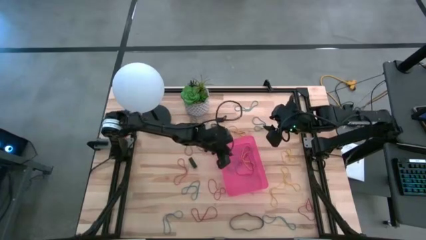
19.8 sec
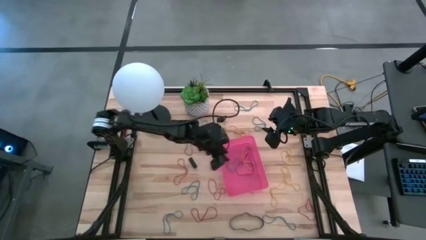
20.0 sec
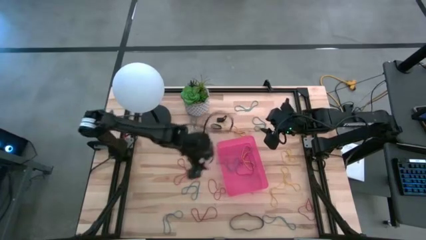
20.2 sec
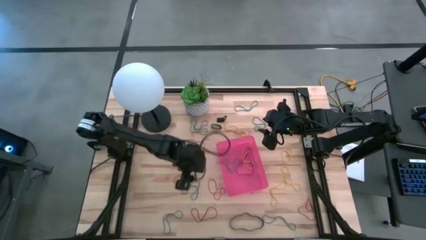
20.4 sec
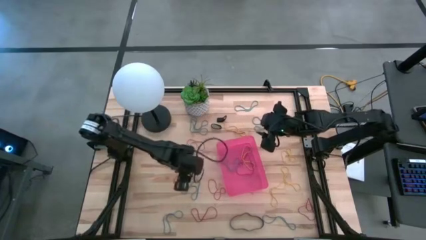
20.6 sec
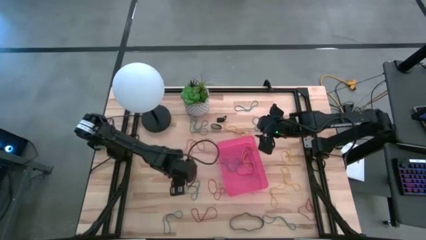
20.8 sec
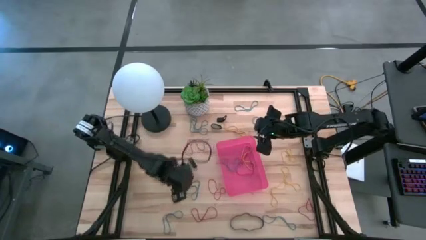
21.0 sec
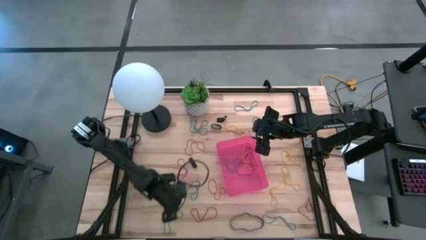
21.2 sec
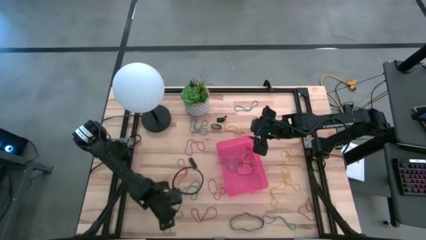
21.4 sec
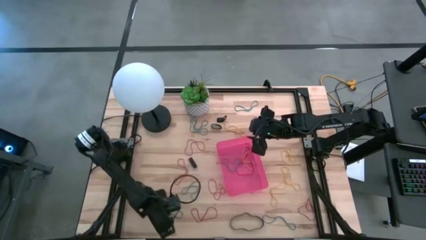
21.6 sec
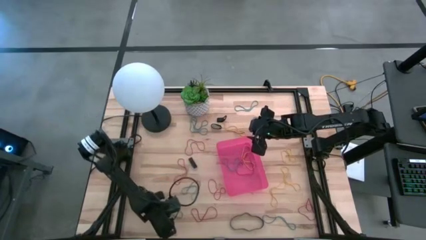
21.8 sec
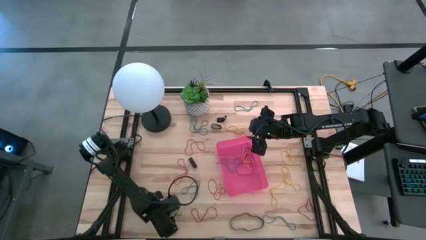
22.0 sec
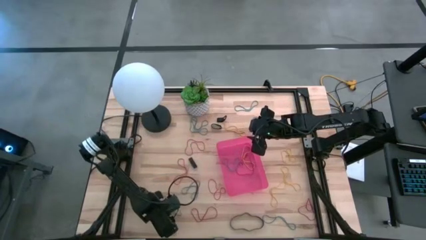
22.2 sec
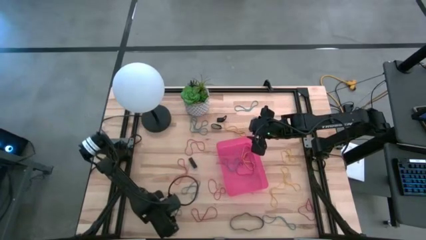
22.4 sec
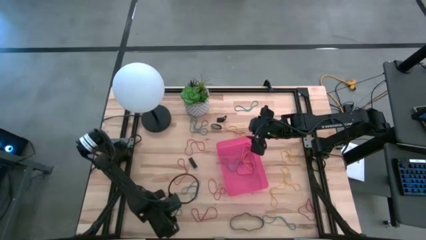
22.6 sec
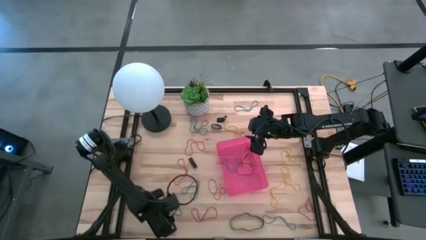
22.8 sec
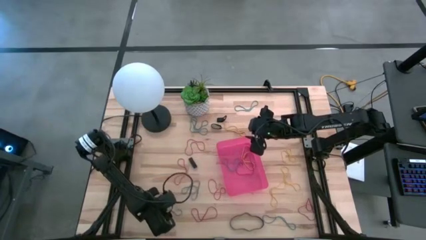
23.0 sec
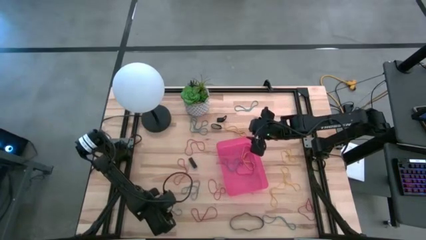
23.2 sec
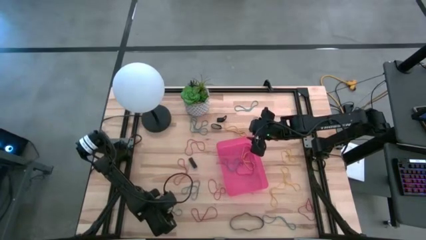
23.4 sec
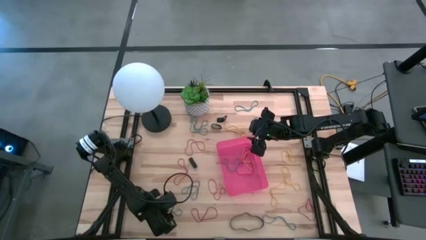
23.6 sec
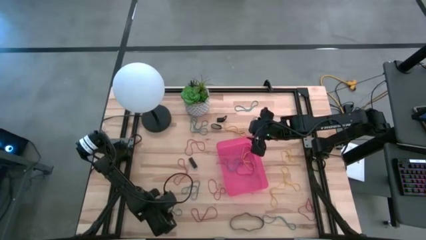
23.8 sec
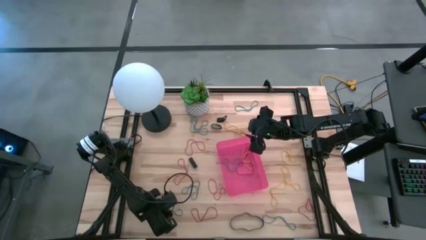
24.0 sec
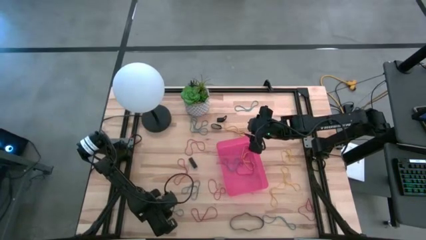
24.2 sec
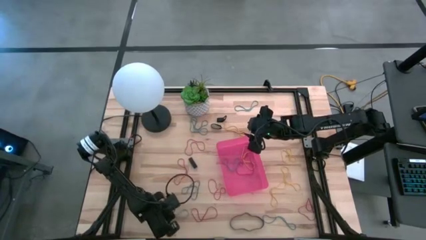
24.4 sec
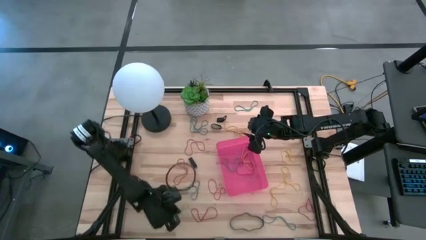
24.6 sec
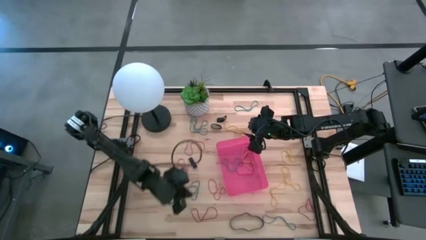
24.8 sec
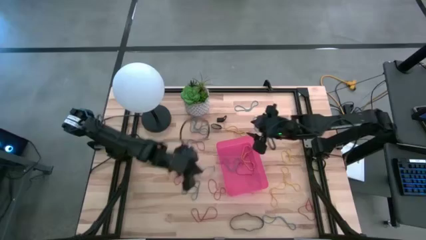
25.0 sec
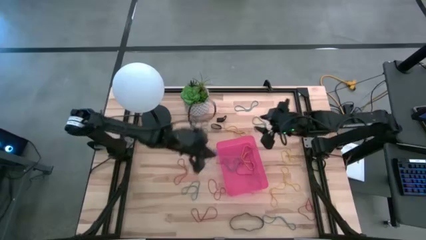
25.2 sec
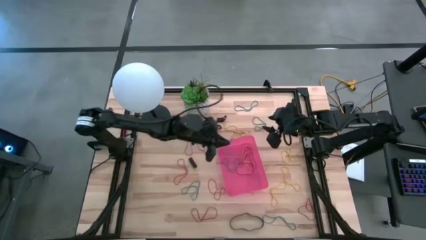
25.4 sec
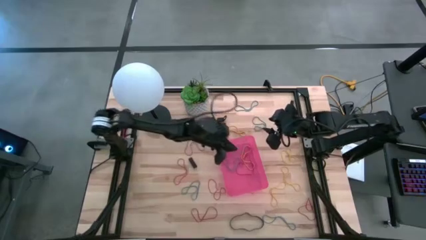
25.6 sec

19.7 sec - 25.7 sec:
Task: Pick and place rubber bands into bin
Put the blue rubber band into the red bin

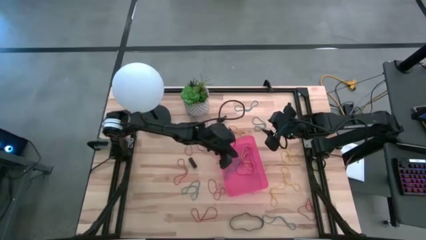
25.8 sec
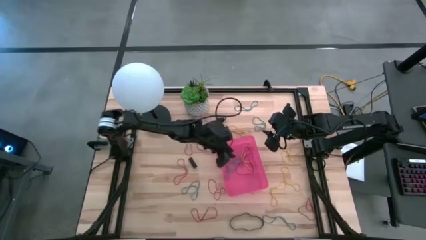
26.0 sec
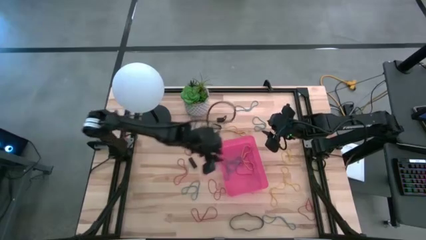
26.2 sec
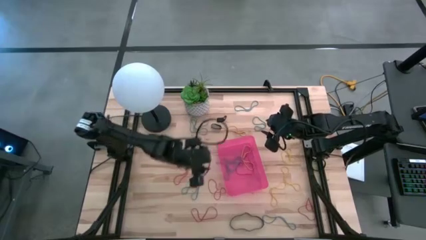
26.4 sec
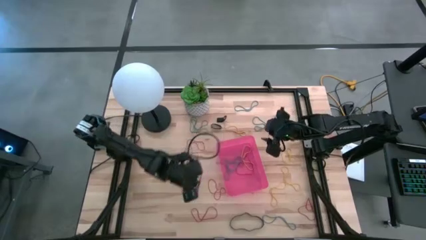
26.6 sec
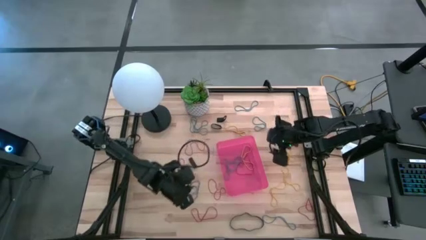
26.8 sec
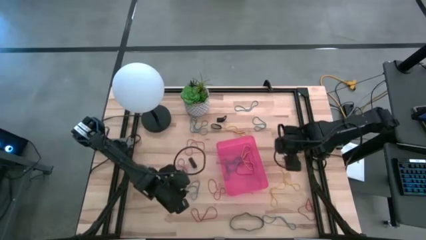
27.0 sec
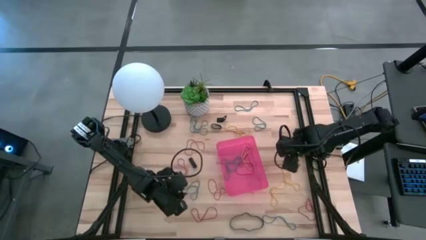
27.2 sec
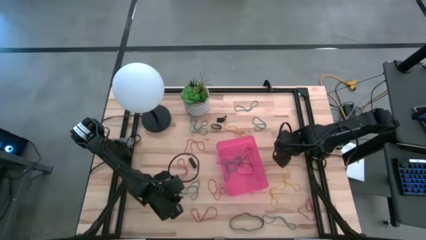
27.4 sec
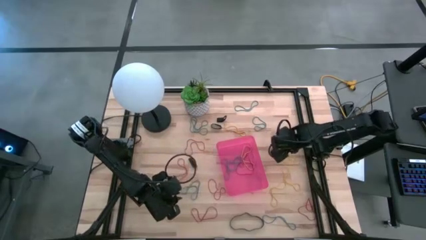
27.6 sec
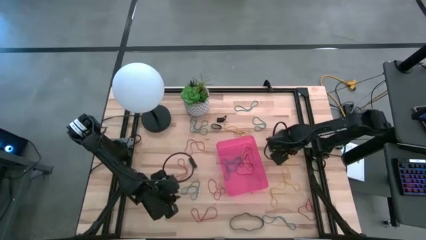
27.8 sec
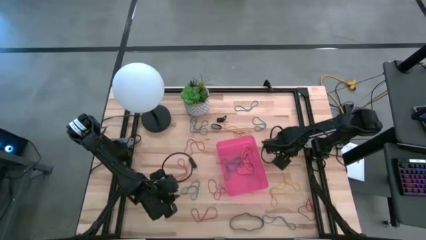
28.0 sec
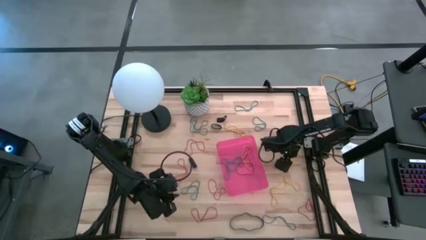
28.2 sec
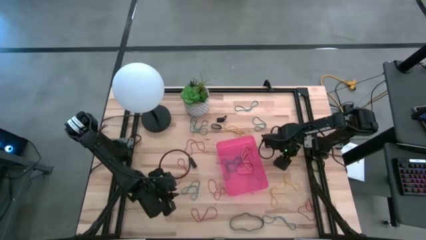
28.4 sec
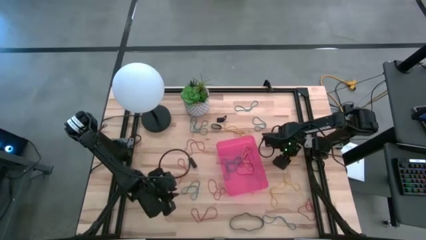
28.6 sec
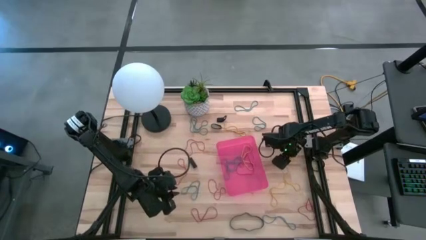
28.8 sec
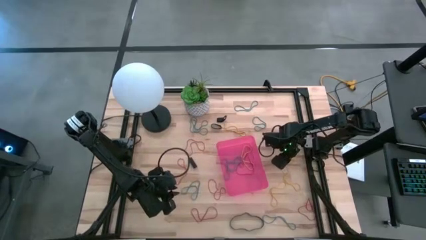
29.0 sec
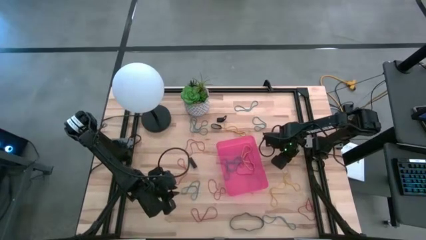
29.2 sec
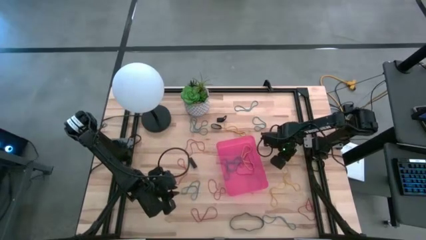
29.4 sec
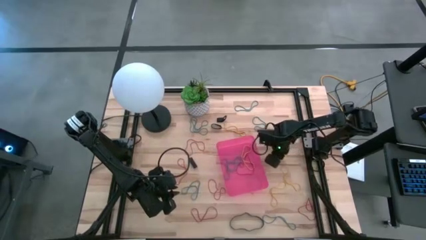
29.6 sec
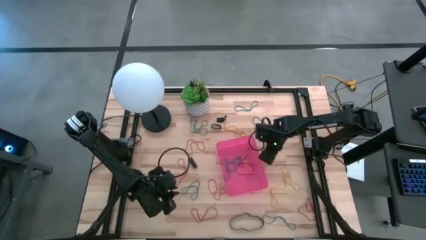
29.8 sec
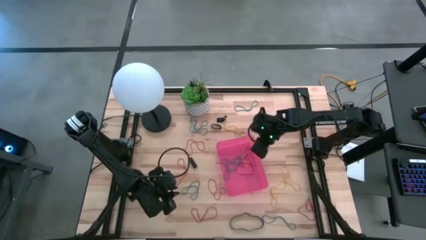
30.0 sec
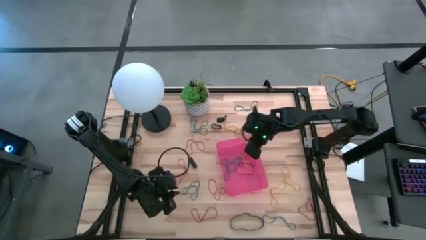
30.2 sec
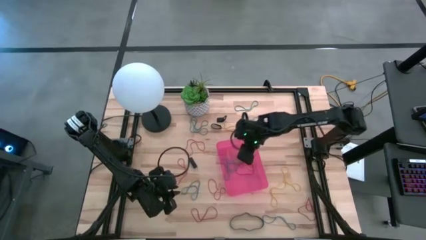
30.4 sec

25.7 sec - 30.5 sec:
Put the yellow rubber band into the red bin

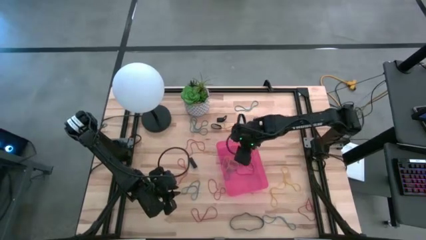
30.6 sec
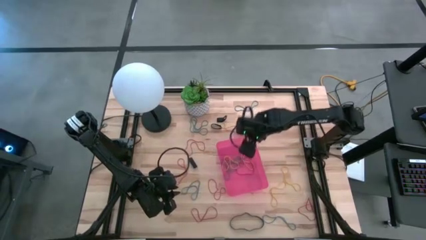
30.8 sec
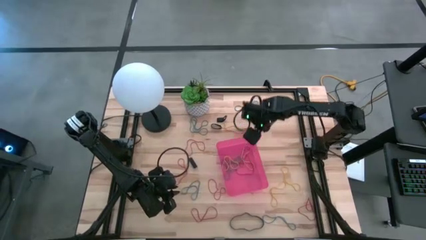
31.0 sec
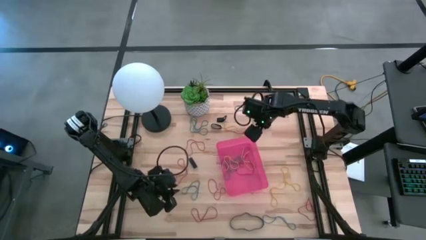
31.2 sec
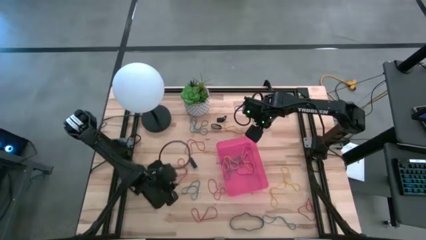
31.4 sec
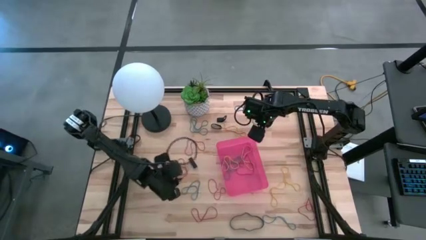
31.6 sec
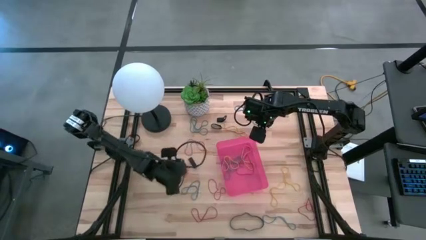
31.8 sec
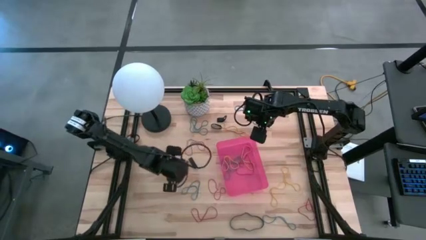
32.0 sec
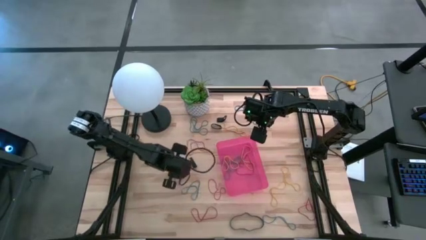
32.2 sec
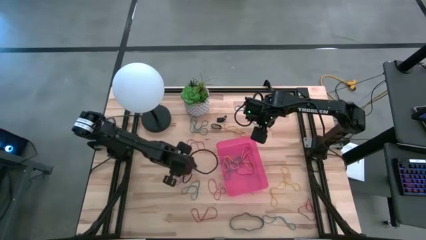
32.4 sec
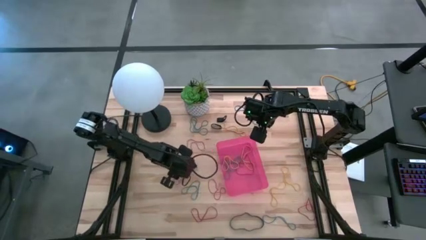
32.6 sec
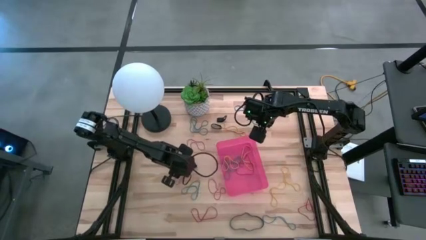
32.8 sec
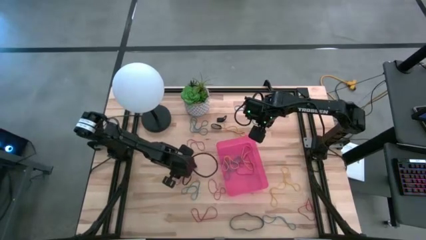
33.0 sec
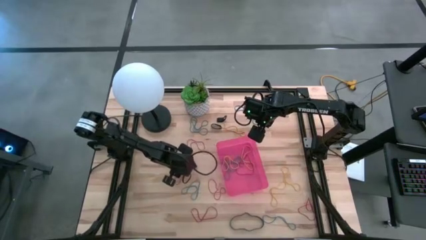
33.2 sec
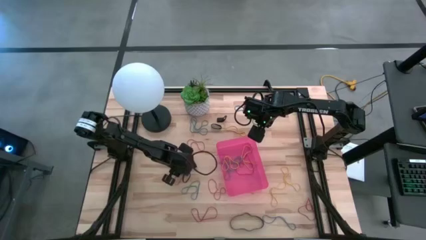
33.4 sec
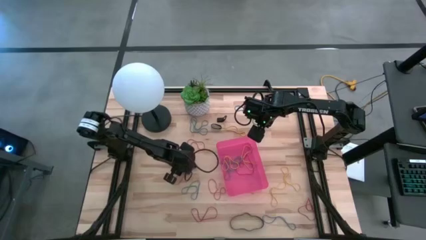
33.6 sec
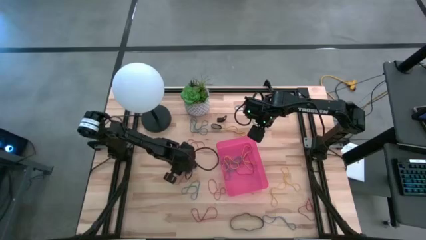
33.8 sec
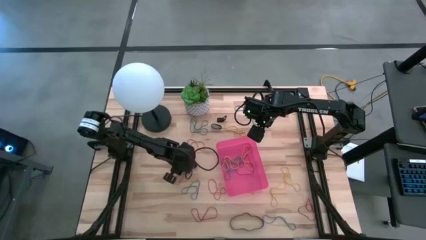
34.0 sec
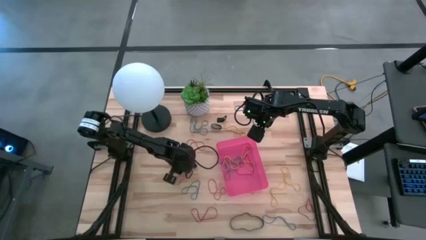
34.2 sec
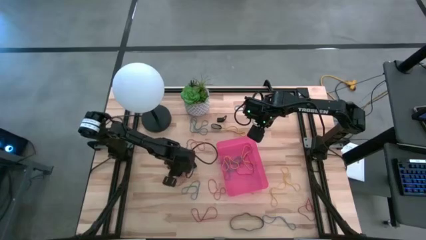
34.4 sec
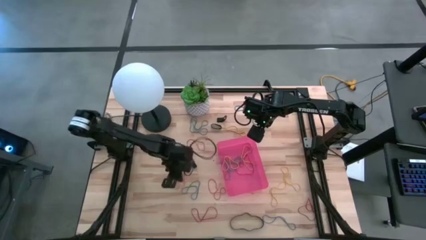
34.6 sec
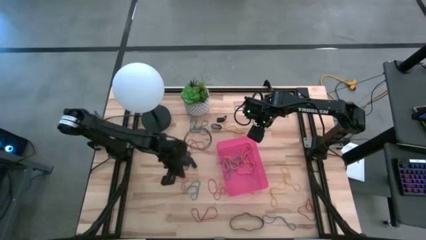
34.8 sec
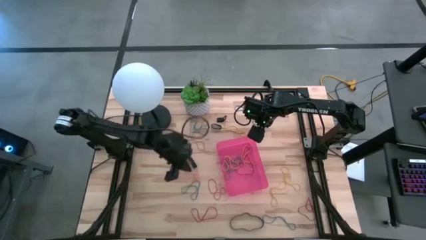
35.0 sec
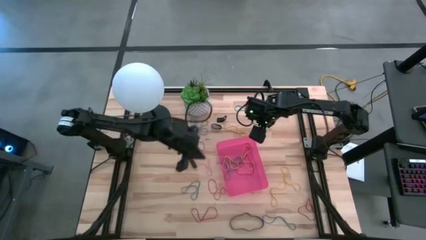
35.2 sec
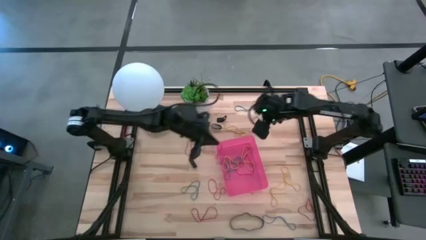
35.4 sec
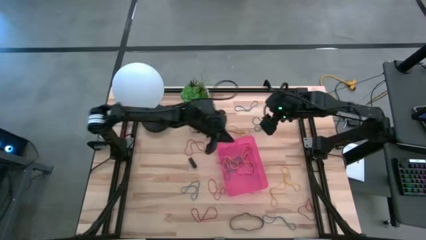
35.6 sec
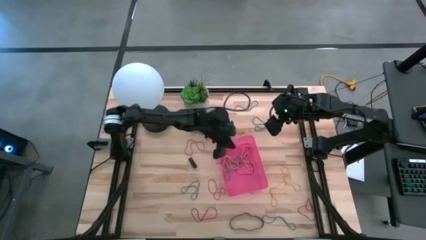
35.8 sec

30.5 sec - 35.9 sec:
Put the red rubber band into the red bin

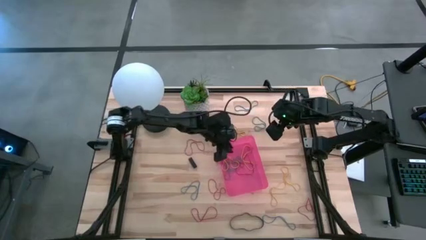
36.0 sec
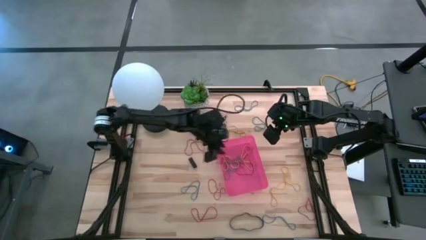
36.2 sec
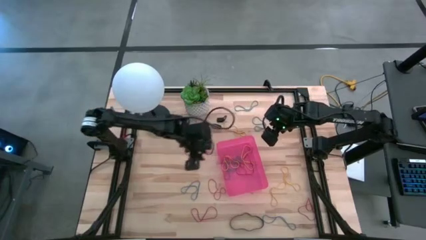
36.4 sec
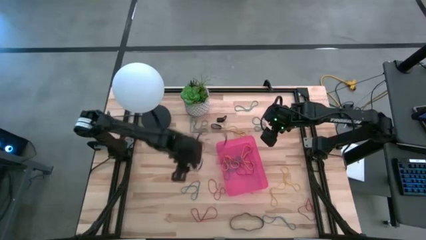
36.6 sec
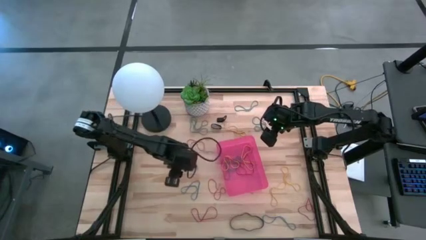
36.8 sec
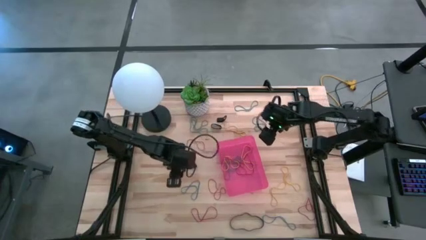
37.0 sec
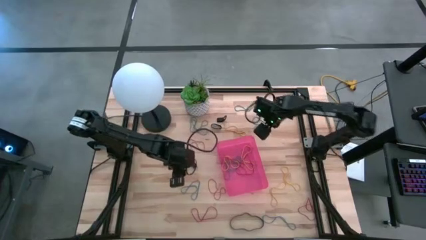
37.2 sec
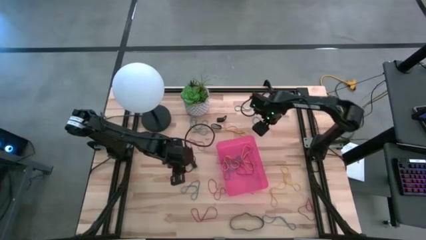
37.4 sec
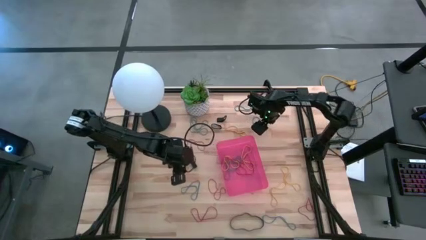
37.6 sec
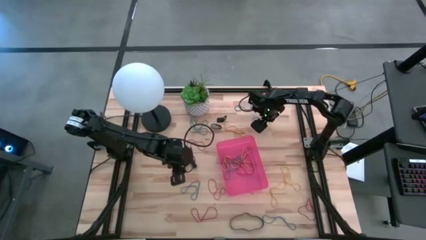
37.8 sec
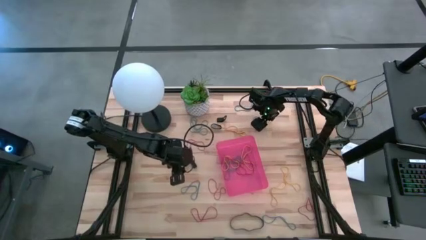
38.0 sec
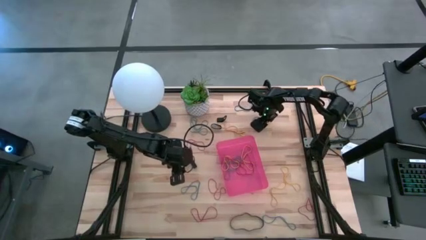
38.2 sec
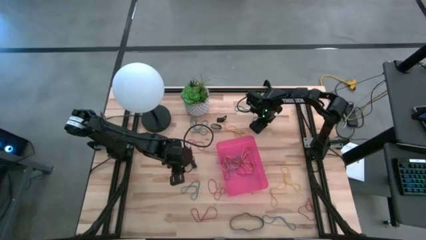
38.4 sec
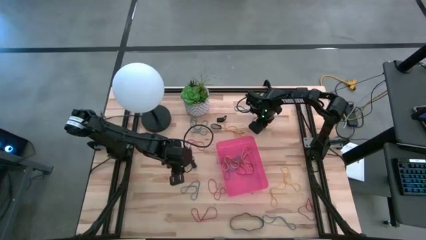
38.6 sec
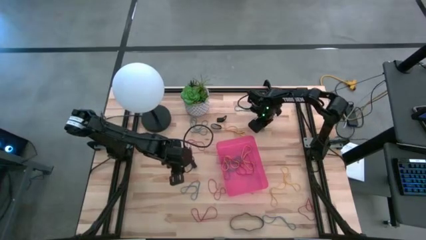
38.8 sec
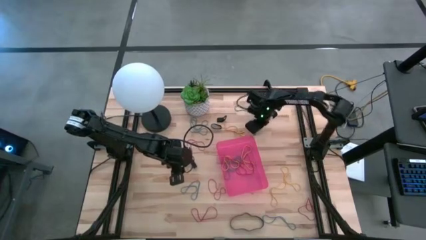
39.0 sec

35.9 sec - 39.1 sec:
Put the blue rubber band into the red bin
